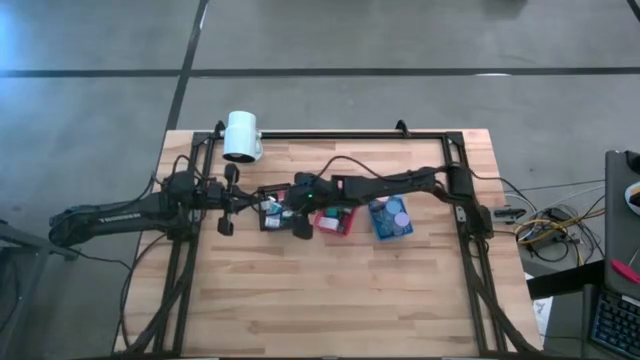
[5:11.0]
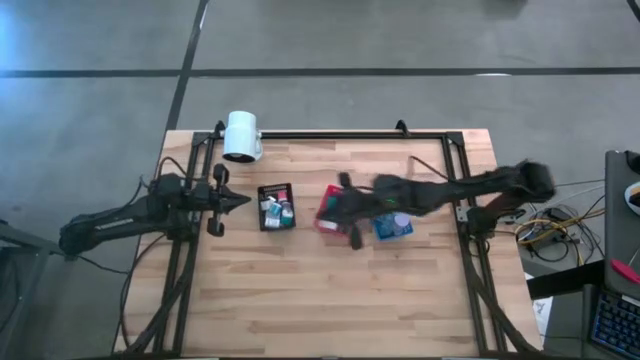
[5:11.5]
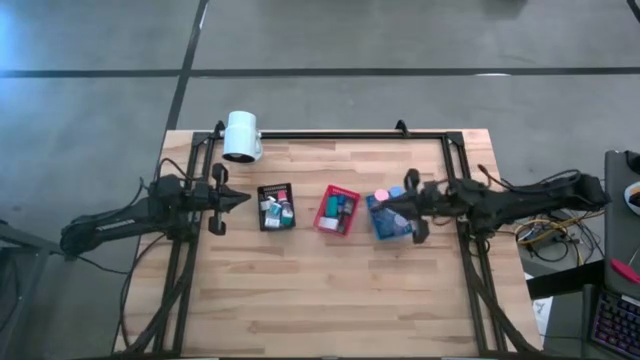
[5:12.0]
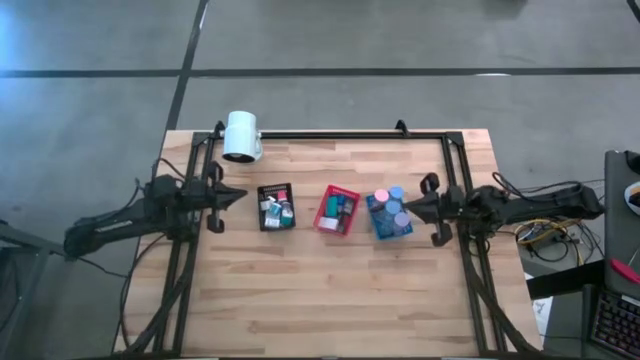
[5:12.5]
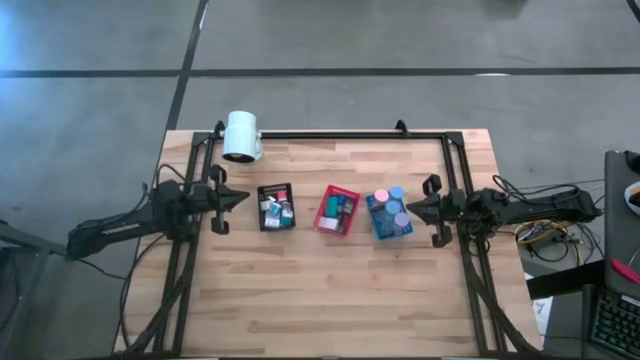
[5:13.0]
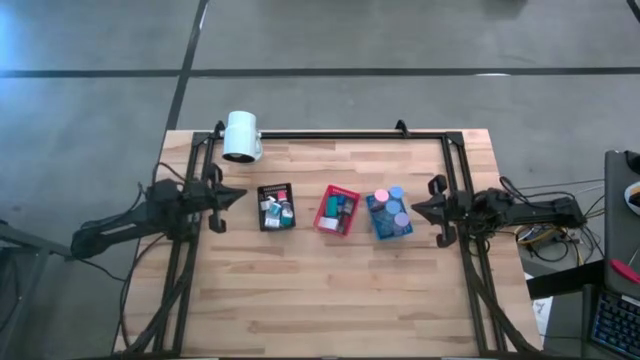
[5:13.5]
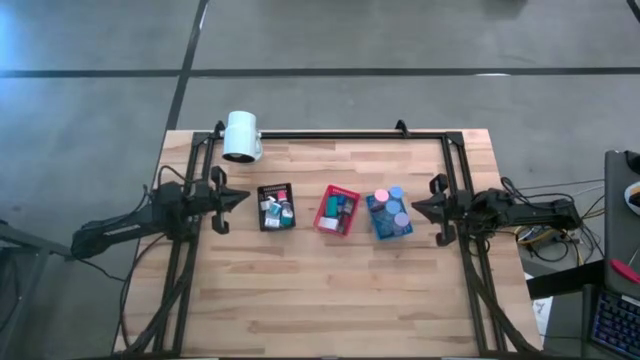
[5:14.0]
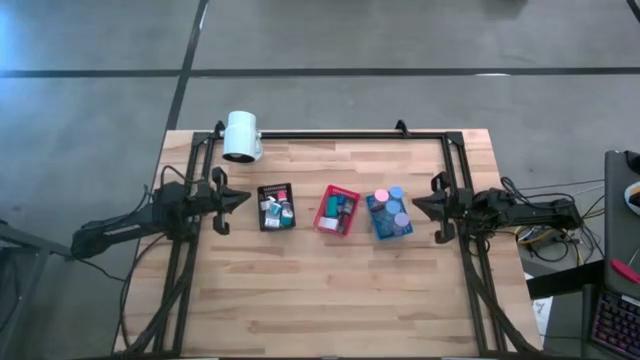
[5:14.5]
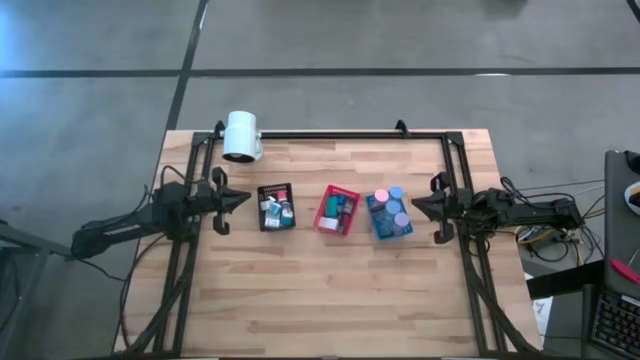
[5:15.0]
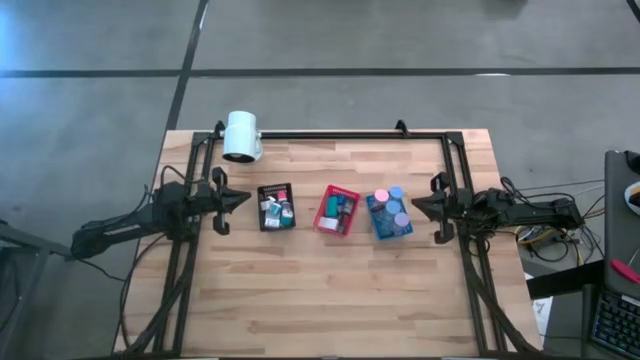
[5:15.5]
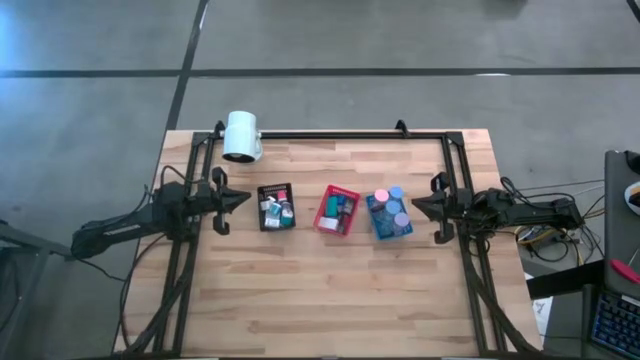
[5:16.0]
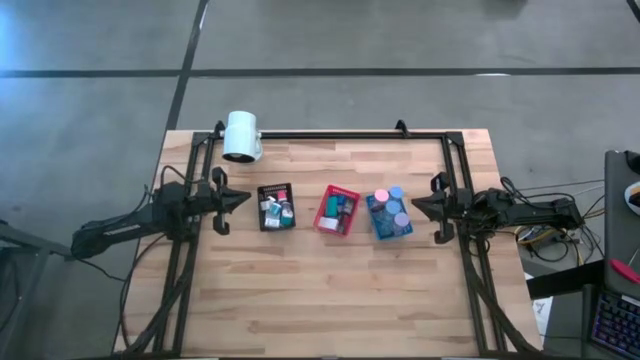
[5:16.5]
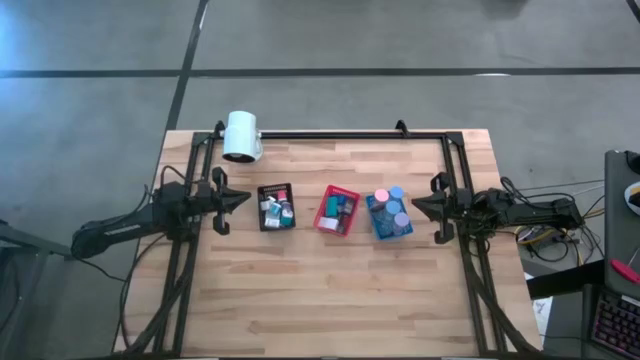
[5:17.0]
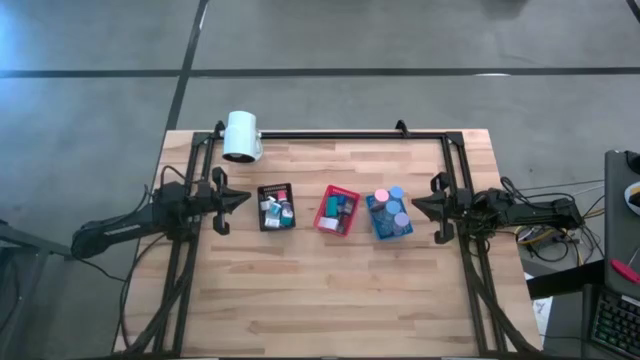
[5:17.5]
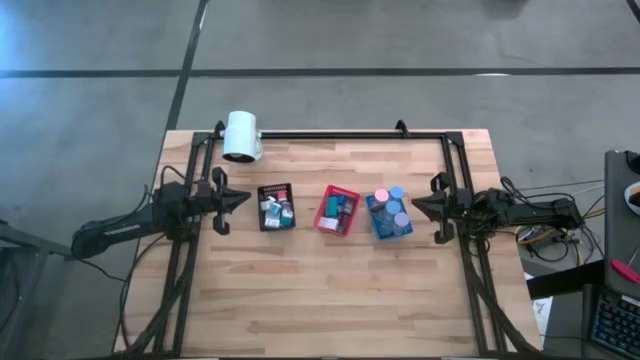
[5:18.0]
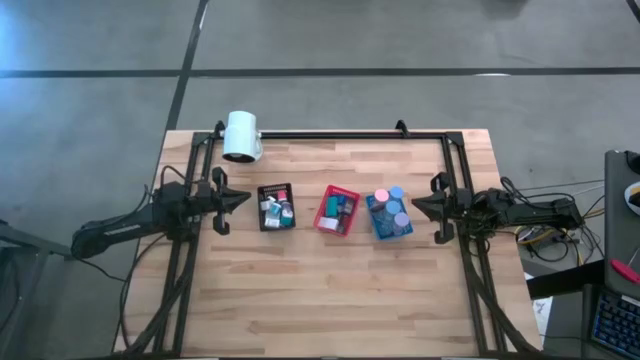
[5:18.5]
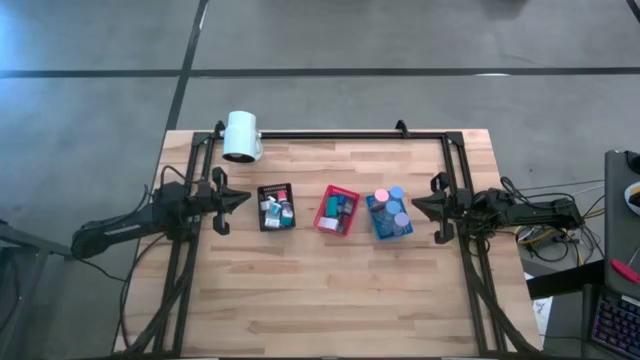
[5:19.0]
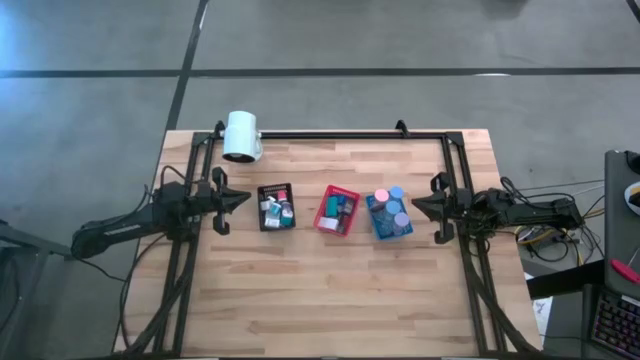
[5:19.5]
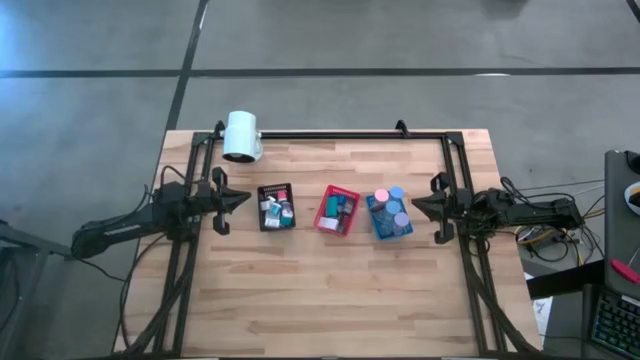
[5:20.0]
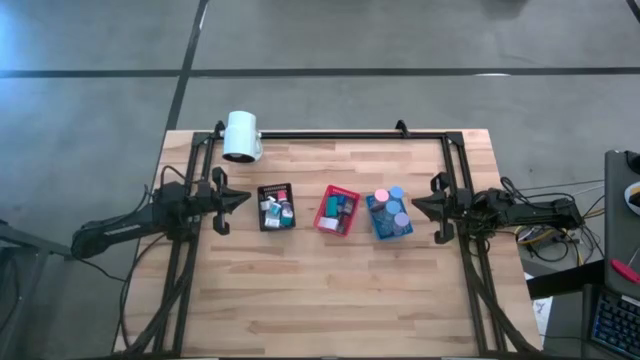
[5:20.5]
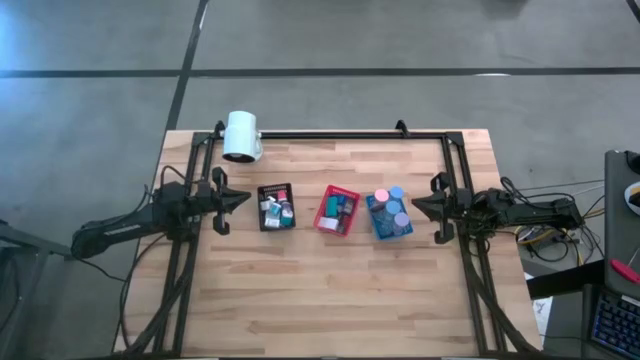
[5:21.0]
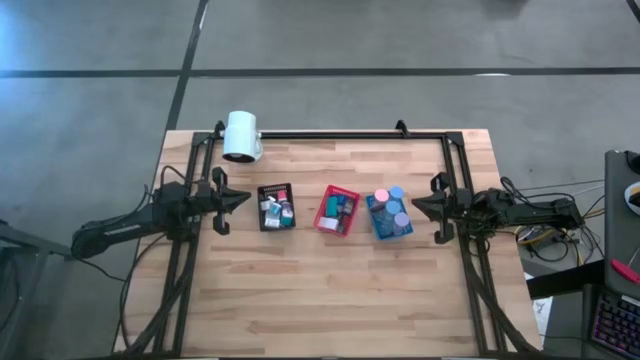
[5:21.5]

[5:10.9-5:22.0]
Task: Pick & Place Office items
Return to Home Position

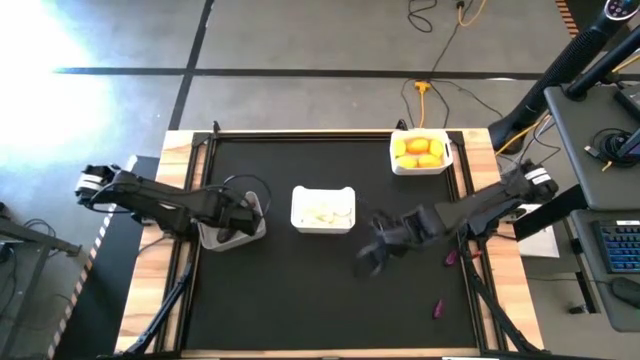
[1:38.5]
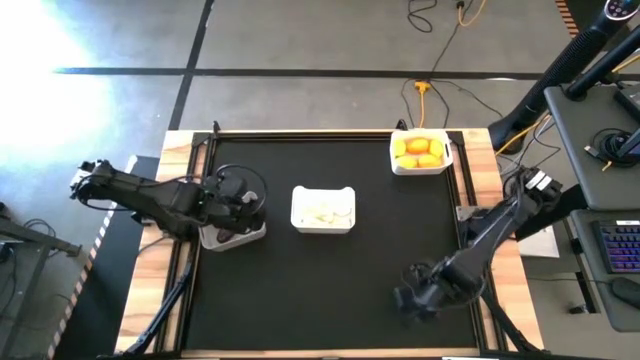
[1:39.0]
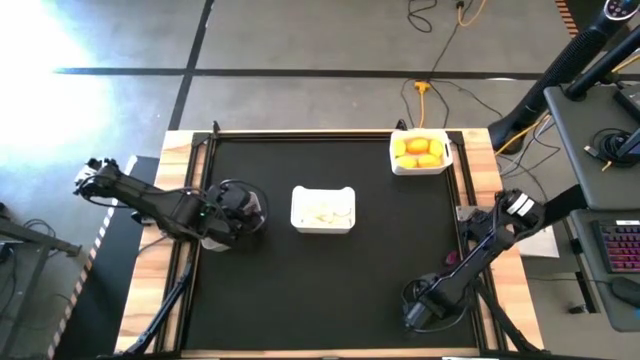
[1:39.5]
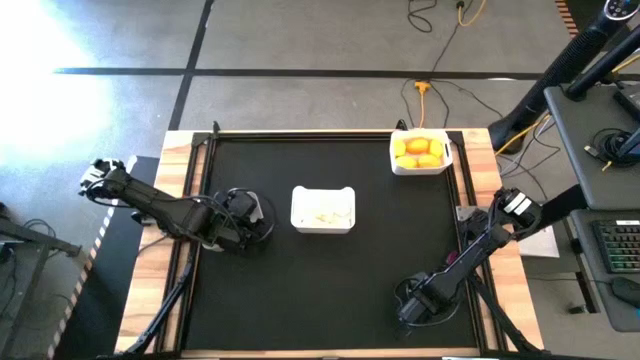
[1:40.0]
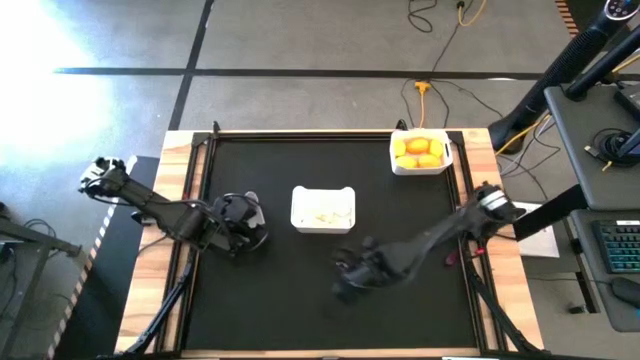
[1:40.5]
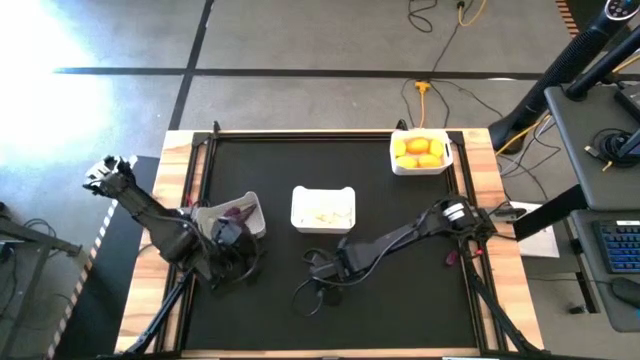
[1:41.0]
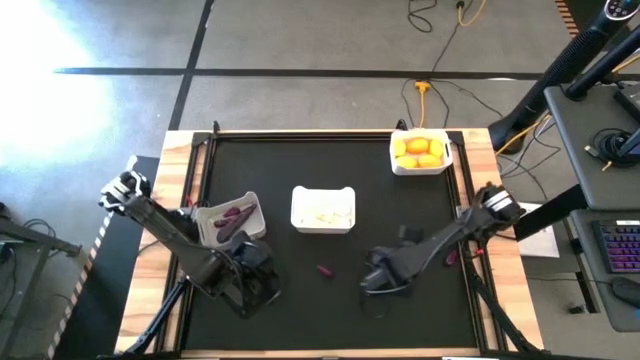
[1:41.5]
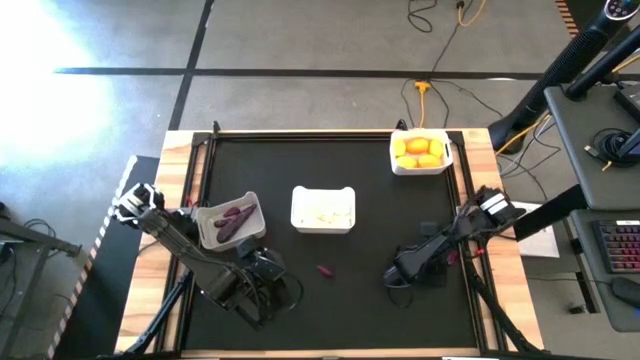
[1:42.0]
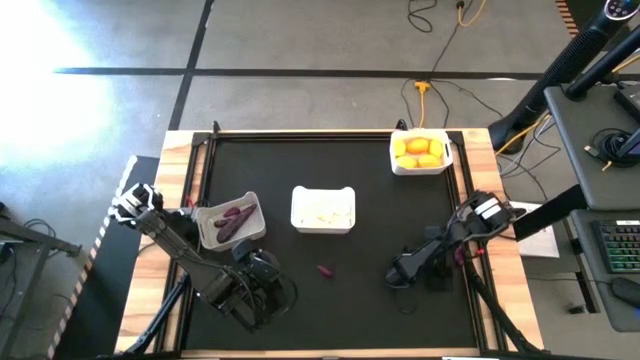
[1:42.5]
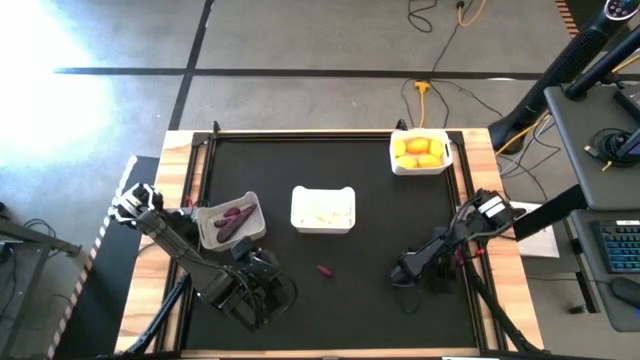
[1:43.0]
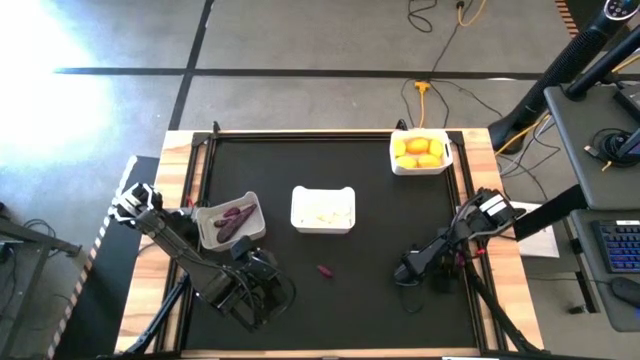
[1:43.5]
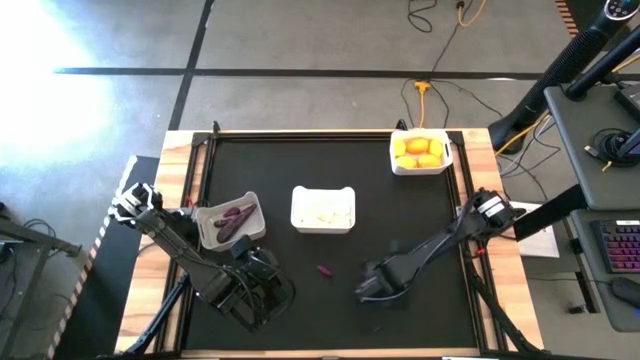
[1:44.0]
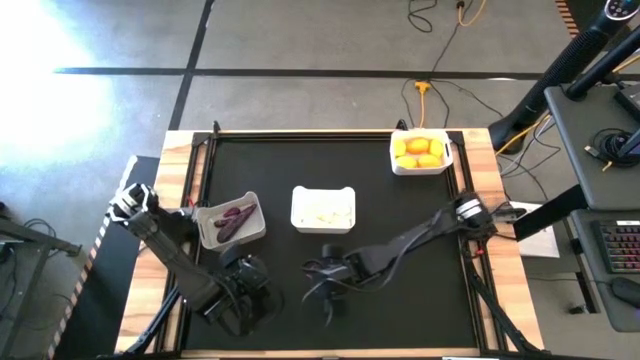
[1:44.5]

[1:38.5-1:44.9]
Task: Sort produce into baskets
Move the purple eggplants to the middle

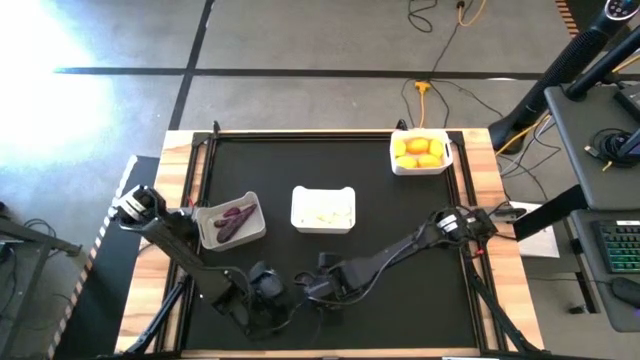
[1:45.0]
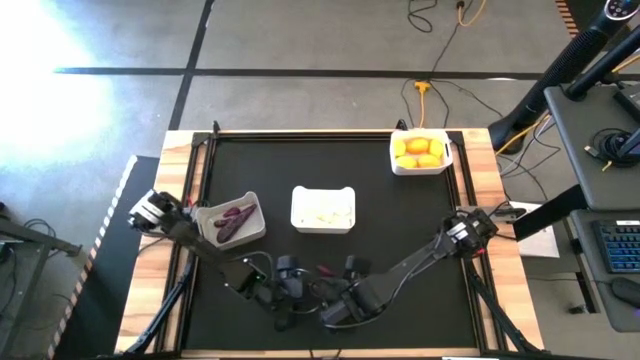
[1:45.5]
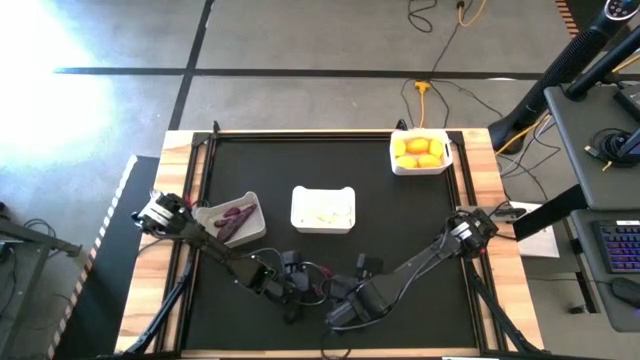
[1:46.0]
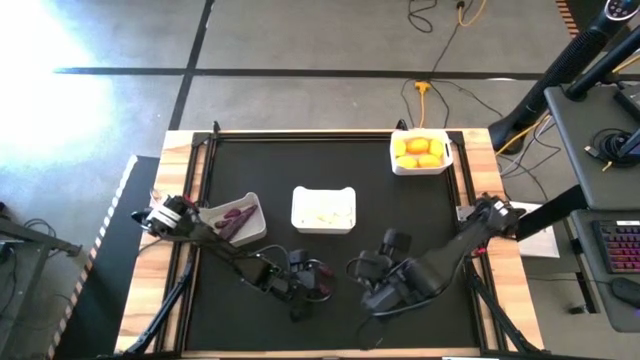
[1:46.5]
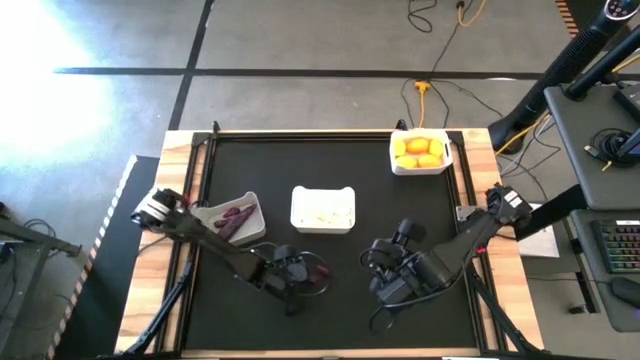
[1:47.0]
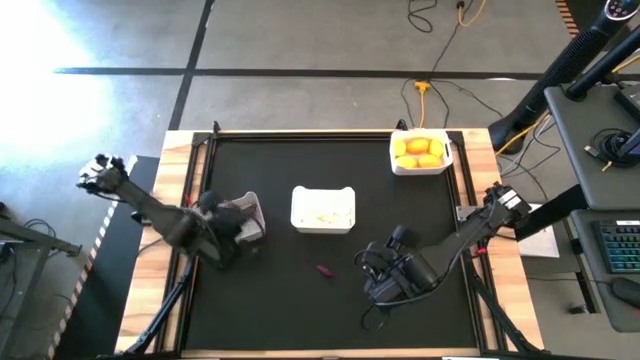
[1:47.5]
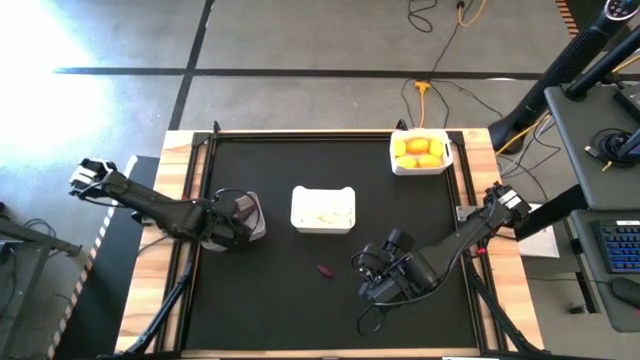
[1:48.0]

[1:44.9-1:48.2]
Put the purple eggplant into the gray bin

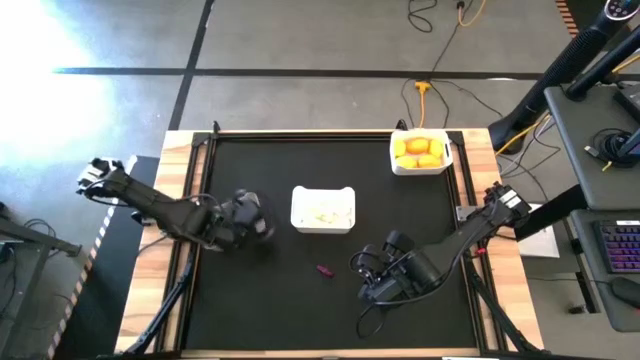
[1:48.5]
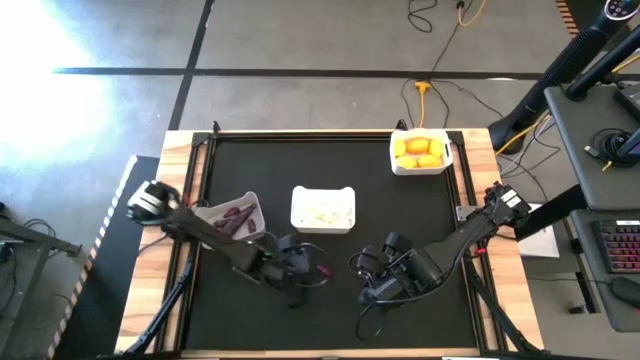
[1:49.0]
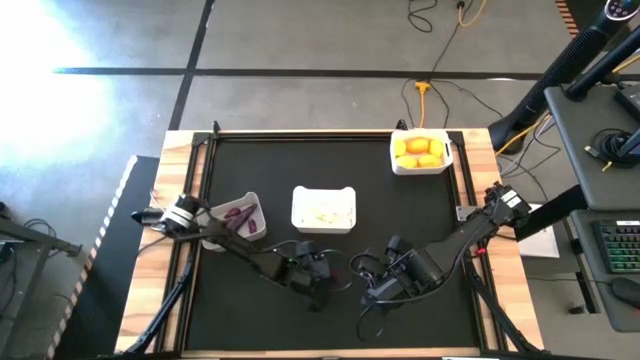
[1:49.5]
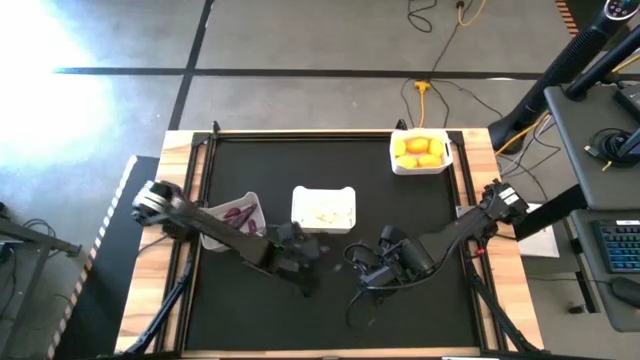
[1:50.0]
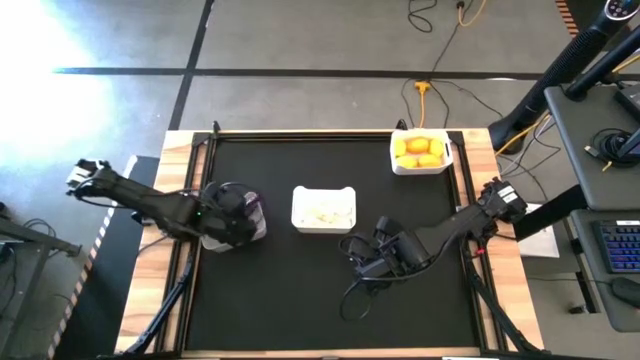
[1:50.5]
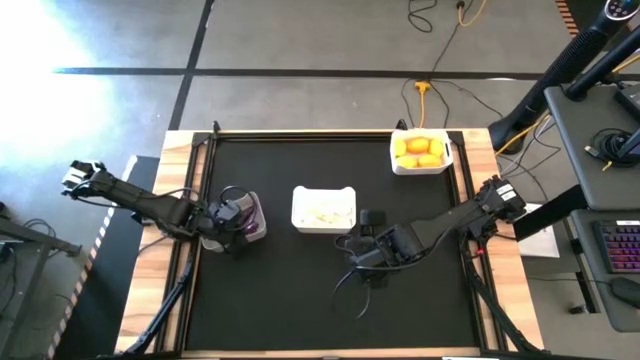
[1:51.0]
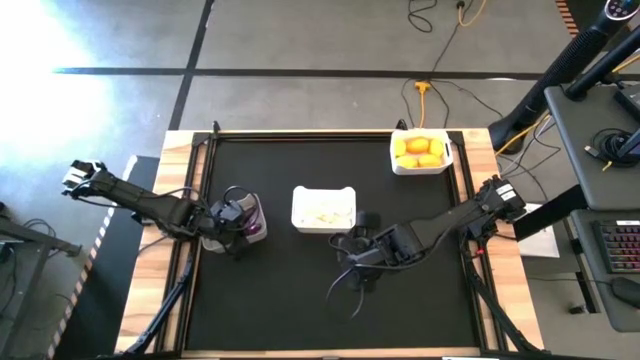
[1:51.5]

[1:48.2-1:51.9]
Put the purple eggplant into the gray bin
